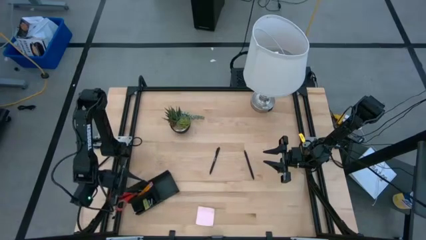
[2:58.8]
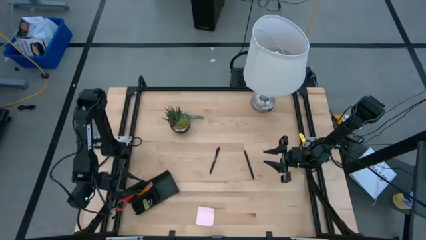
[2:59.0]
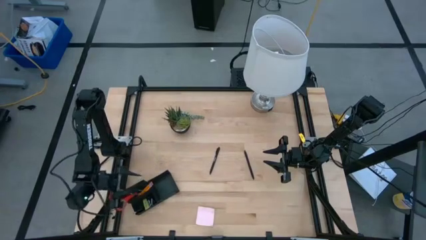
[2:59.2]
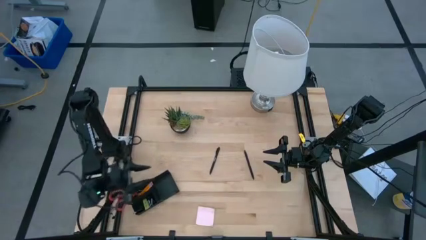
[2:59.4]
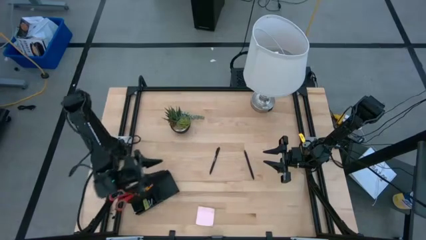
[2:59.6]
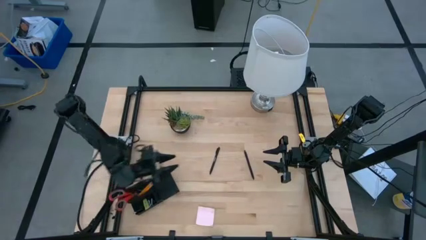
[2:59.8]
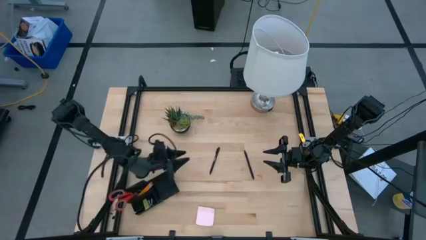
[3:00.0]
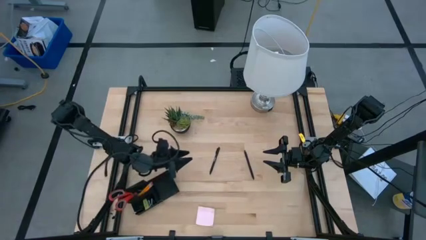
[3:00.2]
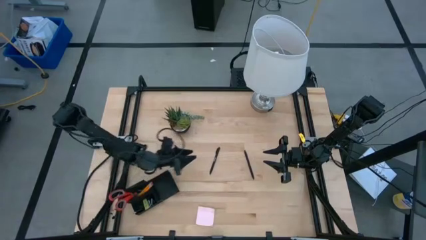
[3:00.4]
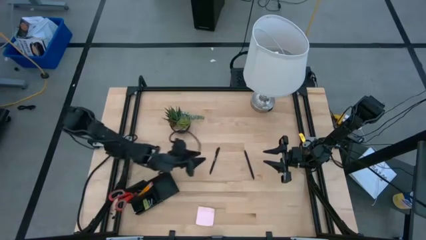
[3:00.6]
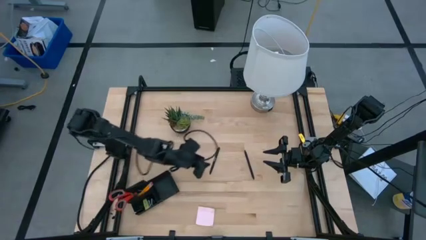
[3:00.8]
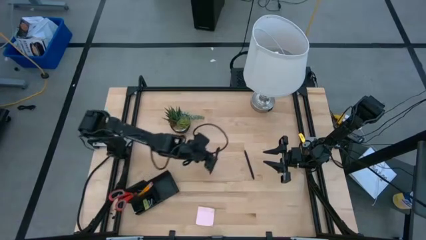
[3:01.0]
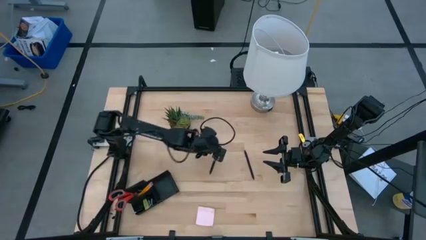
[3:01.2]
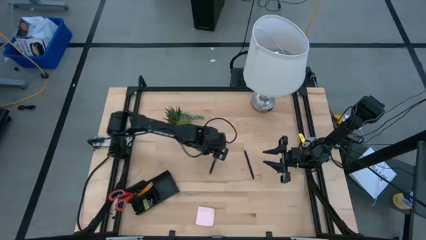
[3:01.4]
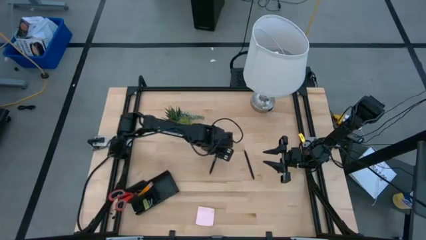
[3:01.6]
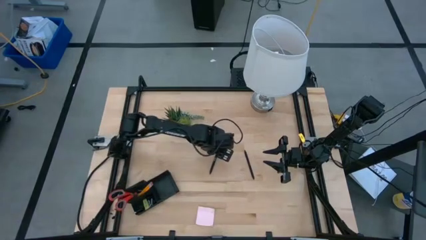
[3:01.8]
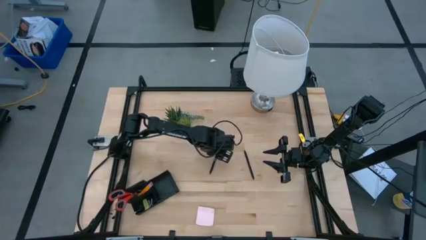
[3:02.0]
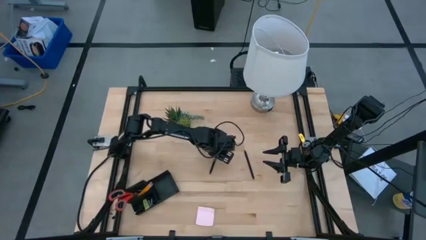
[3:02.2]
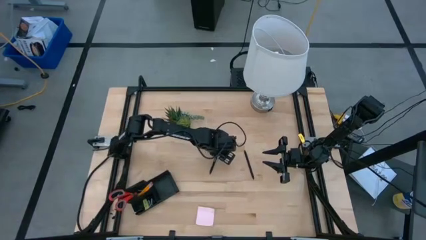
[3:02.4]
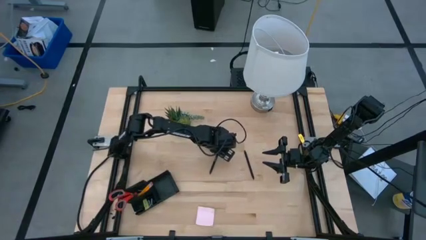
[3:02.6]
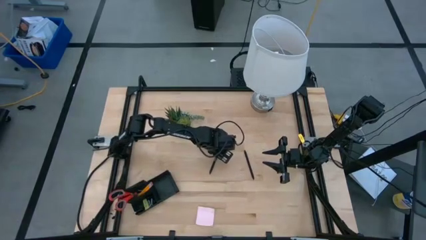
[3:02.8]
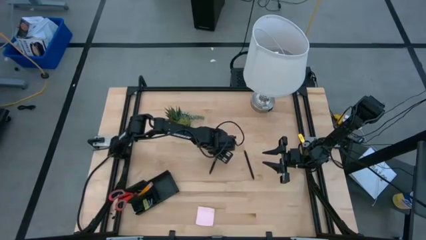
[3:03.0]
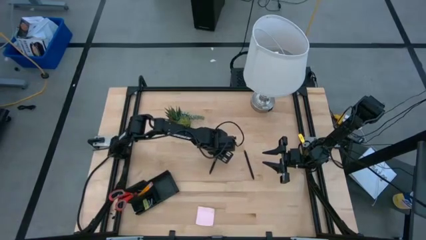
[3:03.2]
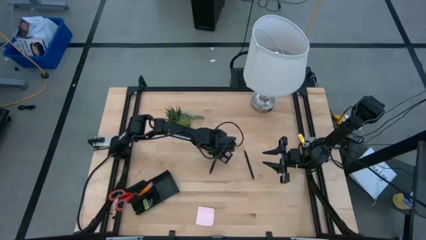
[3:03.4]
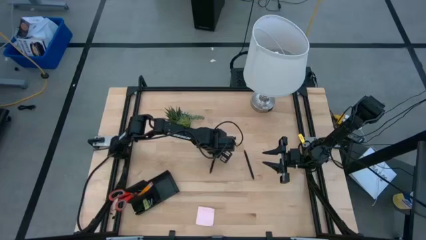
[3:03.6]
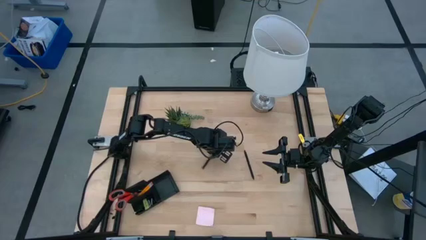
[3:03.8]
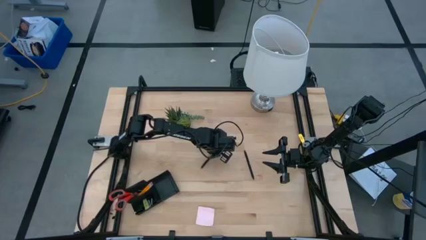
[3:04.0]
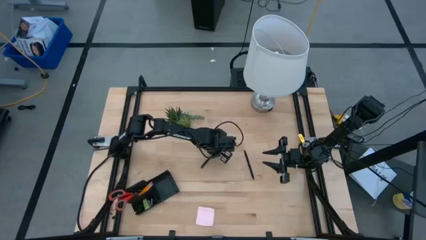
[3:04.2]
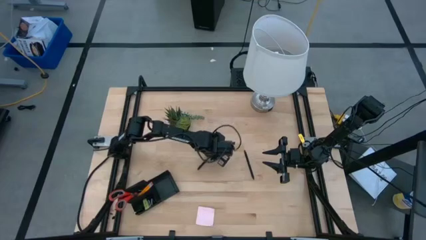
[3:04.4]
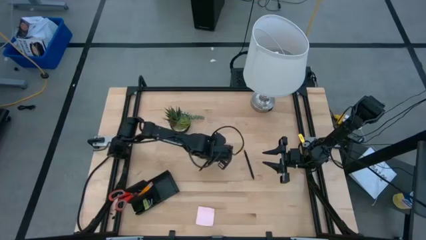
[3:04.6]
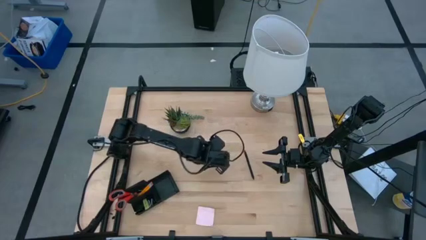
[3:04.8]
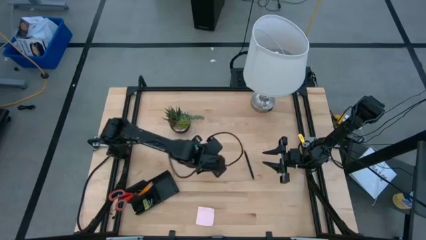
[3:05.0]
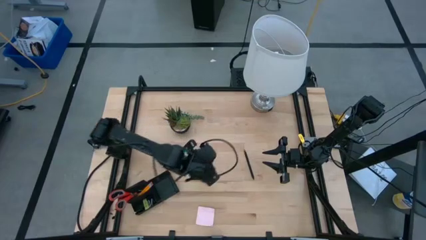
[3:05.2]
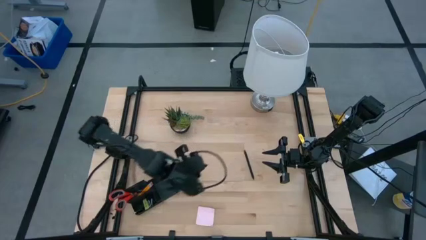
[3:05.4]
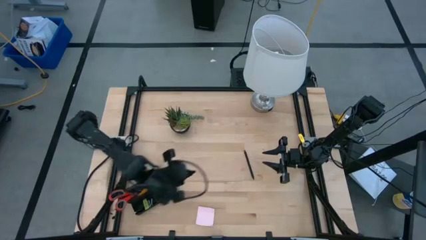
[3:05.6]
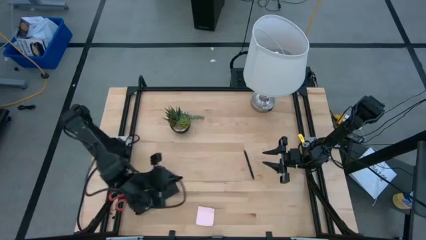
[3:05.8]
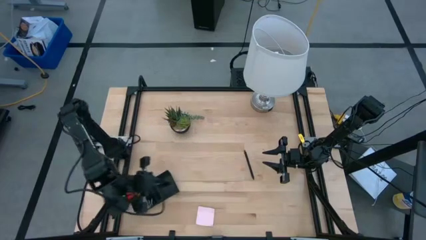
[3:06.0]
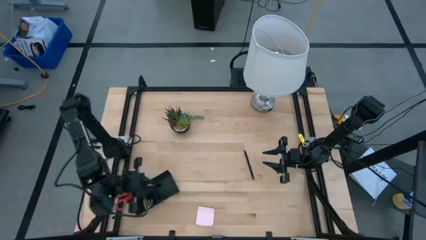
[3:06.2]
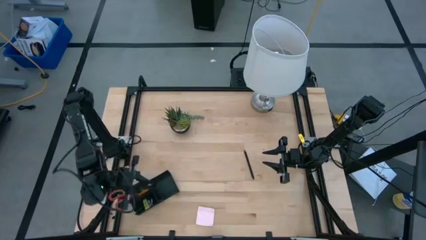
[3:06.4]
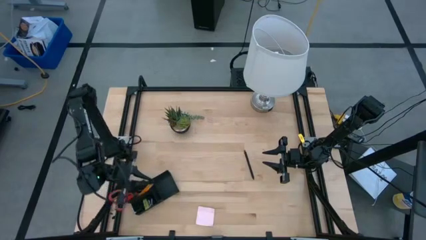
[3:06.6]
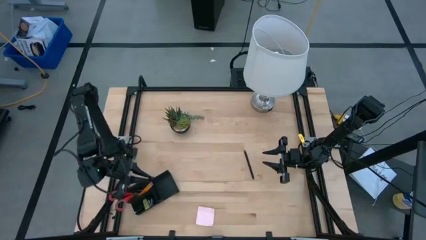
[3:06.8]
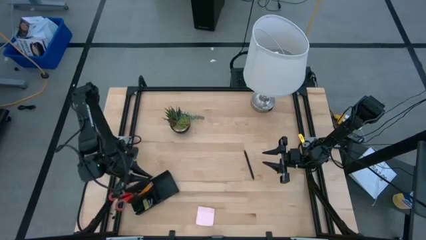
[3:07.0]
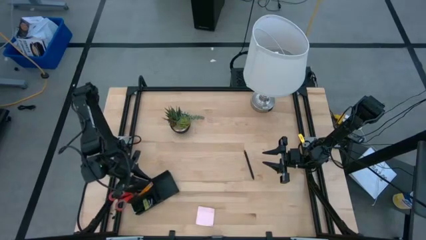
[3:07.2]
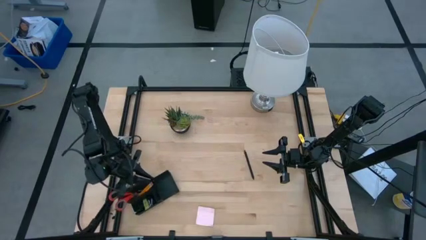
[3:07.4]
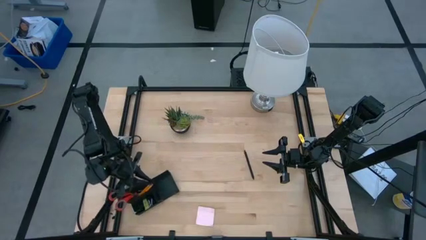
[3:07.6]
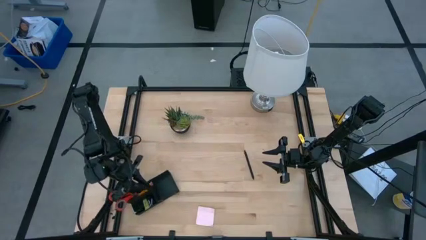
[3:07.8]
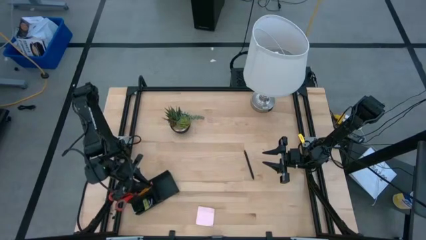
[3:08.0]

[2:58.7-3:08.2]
Task: Pick and place office supplies into organizer
Put the left pen into the top left section of the desk organizer

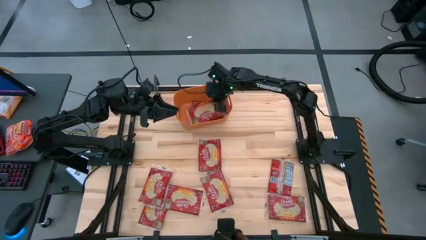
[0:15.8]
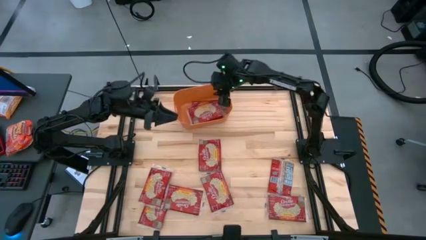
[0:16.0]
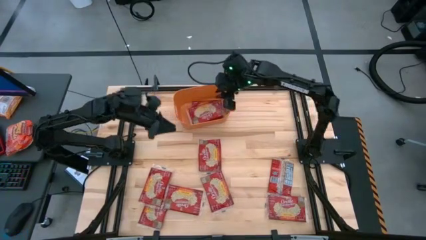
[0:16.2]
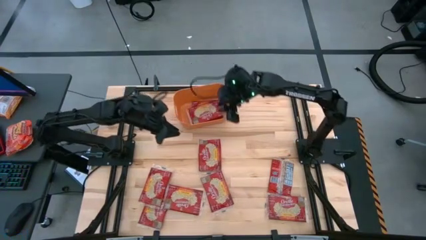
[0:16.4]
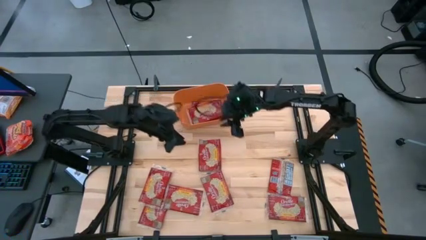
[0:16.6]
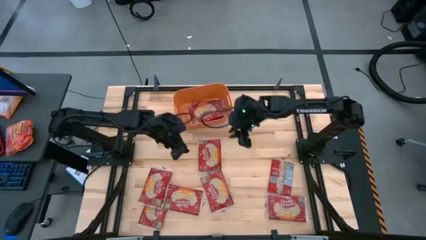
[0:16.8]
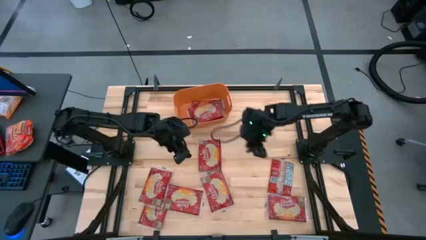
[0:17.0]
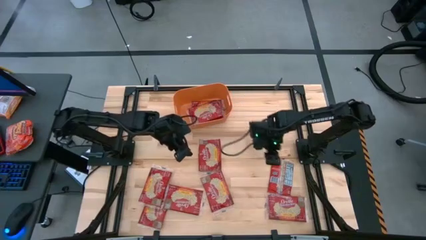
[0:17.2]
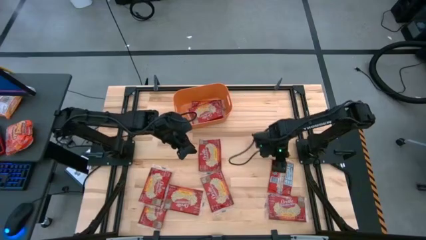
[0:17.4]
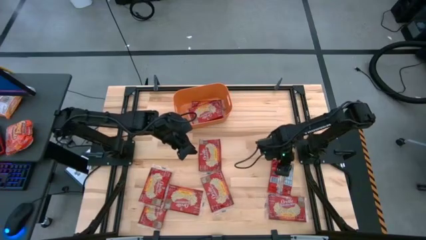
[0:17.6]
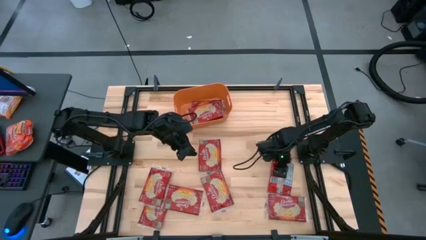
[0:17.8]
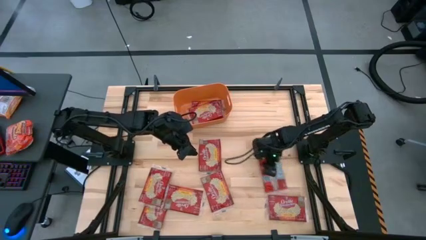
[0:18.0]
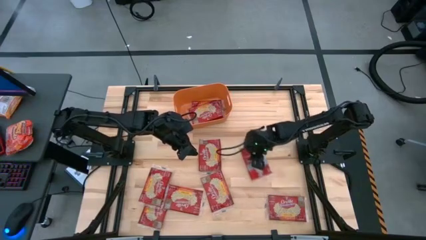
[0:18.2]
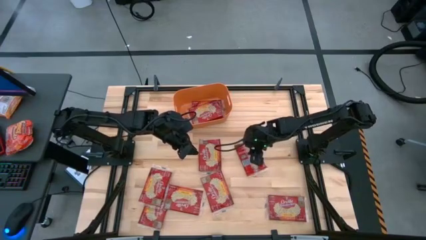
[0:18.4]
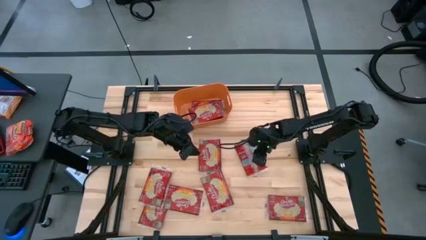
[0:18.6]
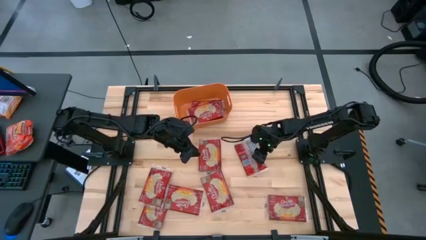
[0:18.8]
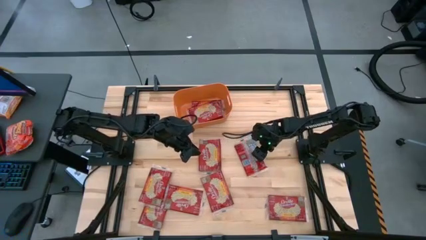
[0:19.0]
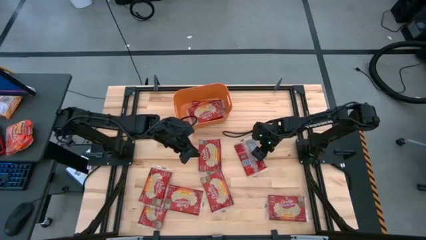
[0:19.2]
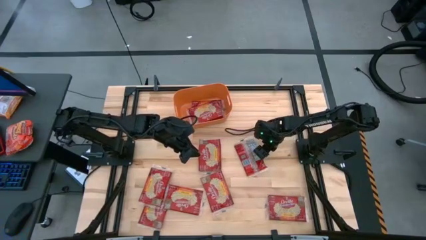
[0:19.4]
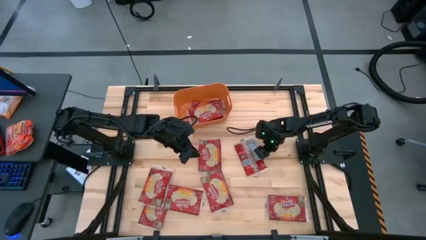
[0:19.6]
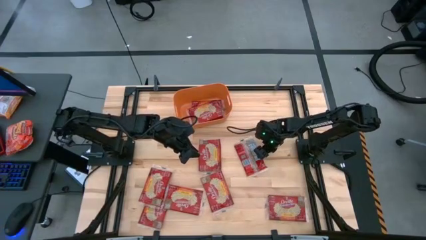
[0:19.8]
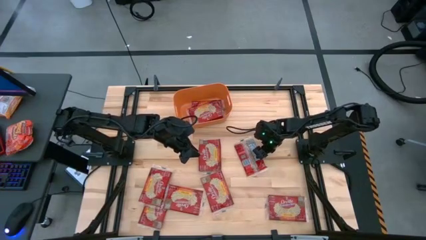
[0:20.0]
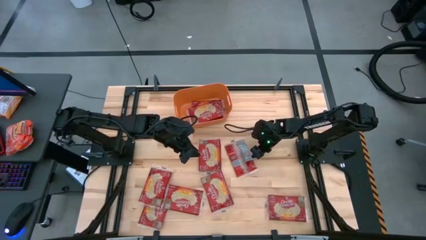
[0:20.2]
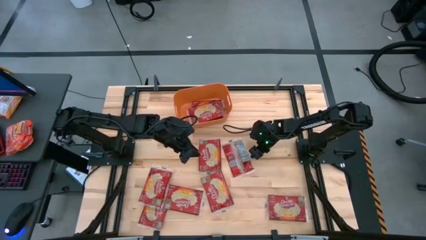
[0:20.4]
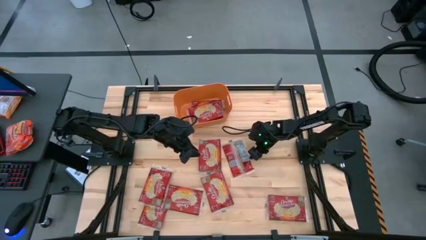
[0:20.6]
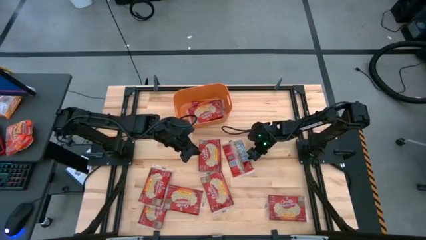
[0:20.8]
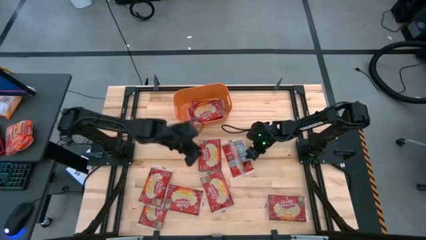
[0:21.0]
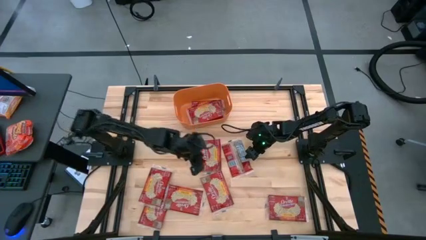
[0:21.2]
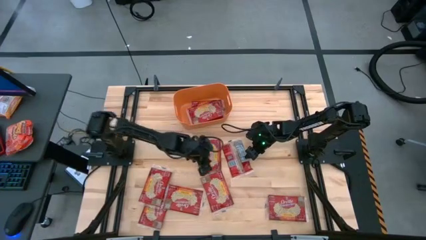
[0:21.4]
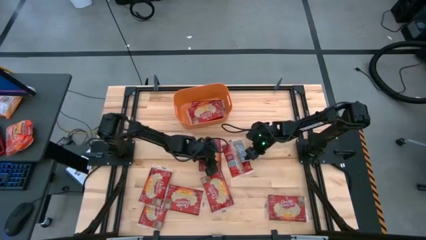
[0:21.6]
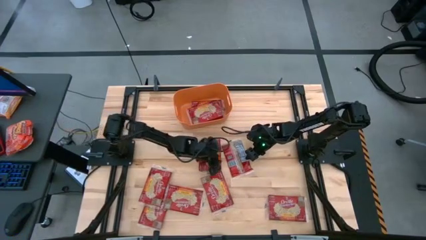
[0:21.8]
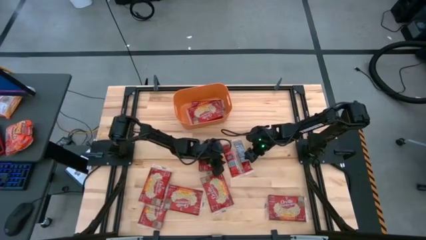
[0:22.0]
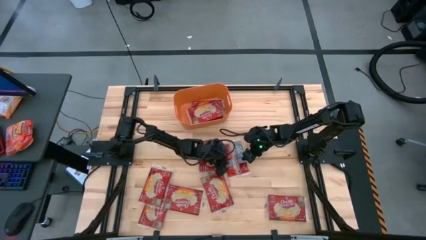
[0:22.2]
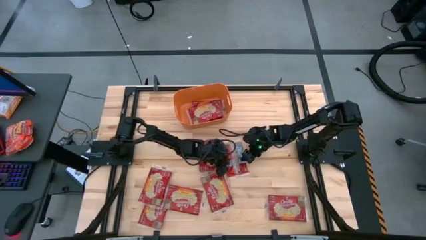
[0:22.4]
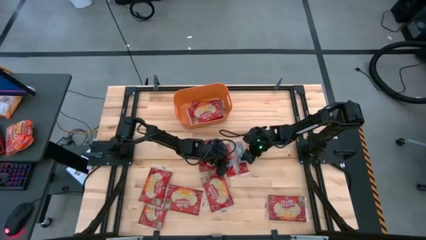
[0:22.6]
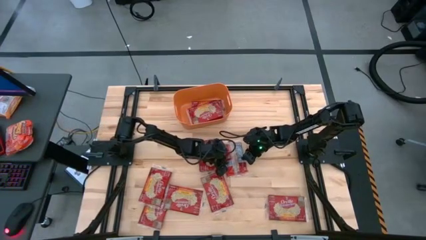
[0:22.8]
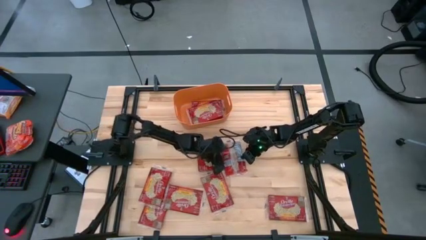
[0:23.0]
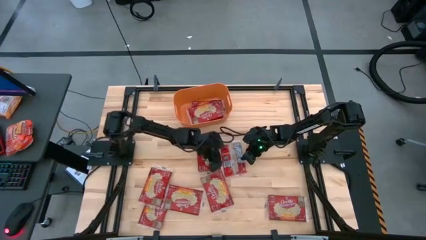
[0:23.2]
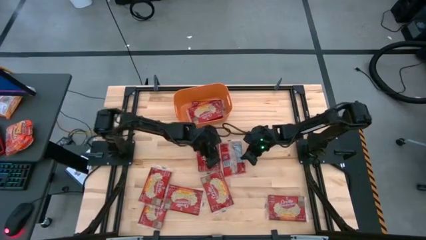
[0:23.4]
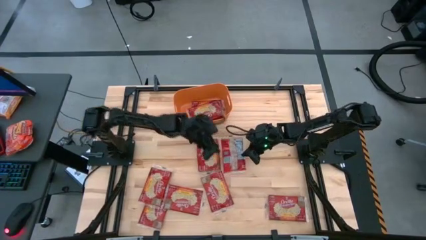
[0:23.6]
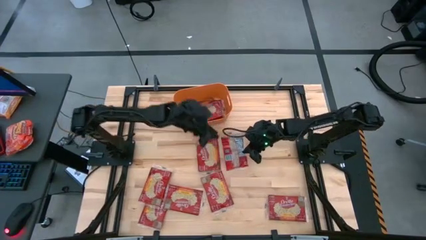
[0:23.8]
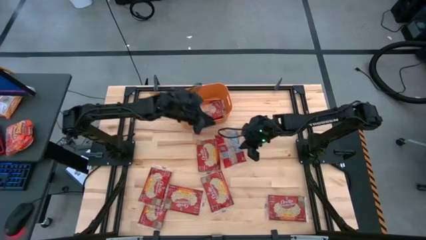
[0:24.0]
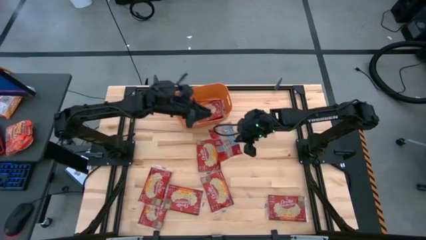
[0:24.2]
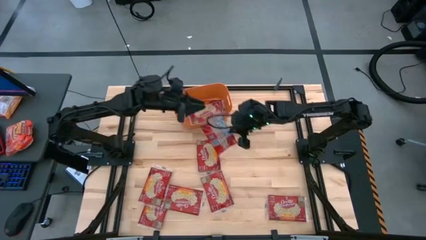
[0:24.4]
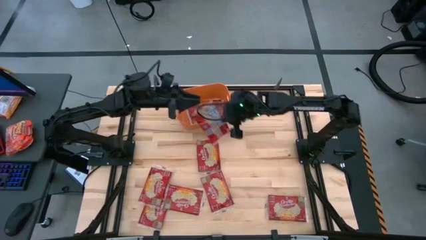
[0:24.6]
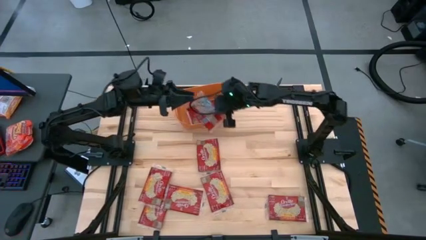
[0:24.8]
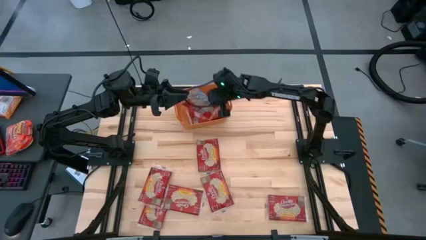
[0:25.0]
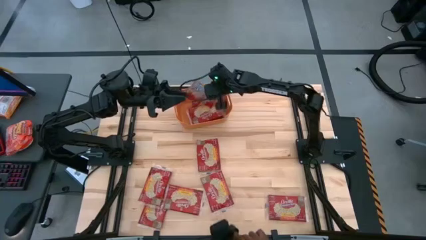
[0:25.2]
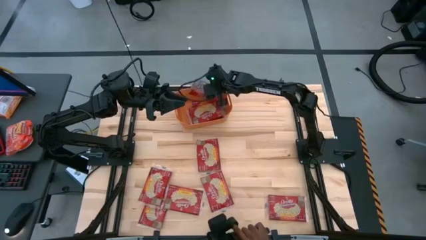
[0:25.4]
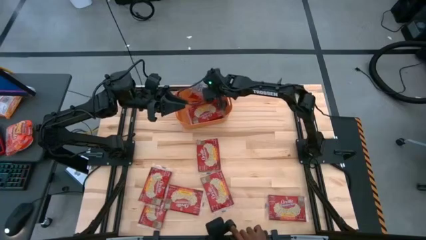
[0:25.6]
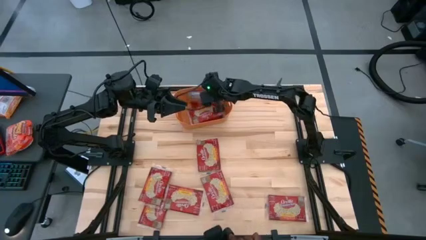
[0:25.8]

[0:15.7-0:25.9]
Task: Sort popcorn bags into baskets
Put the red popcorn bag into the orange bin
